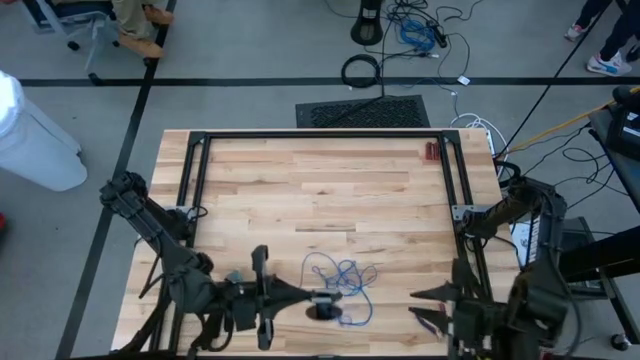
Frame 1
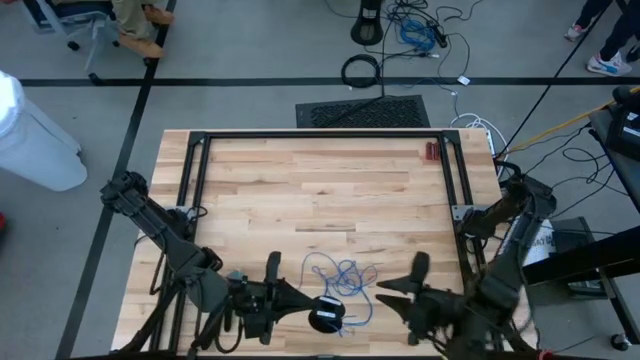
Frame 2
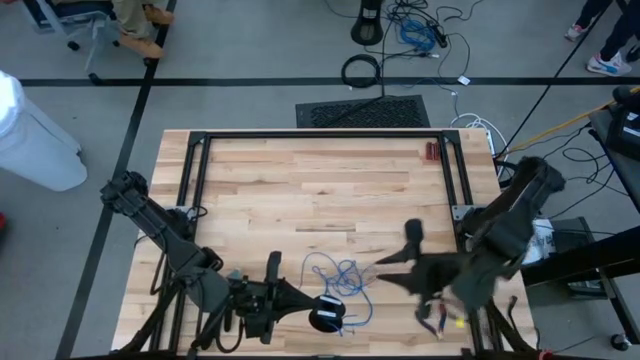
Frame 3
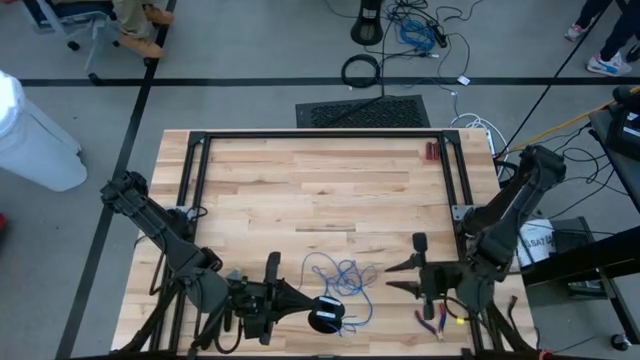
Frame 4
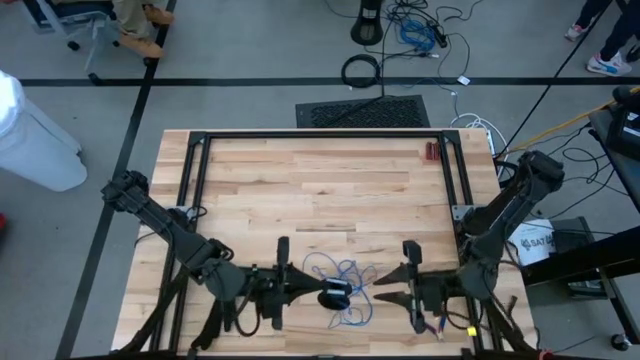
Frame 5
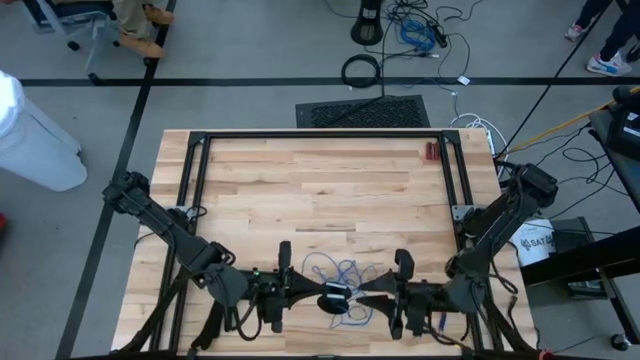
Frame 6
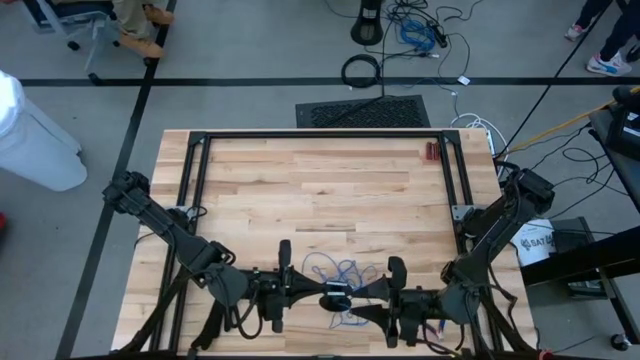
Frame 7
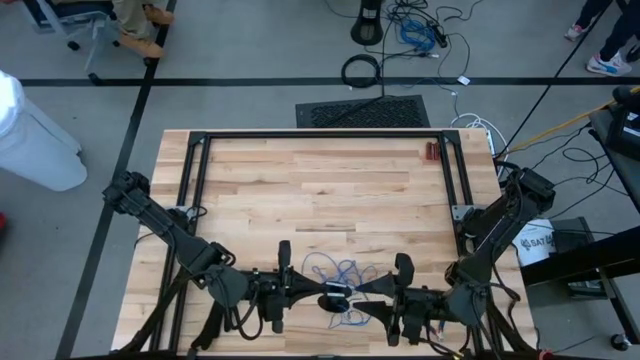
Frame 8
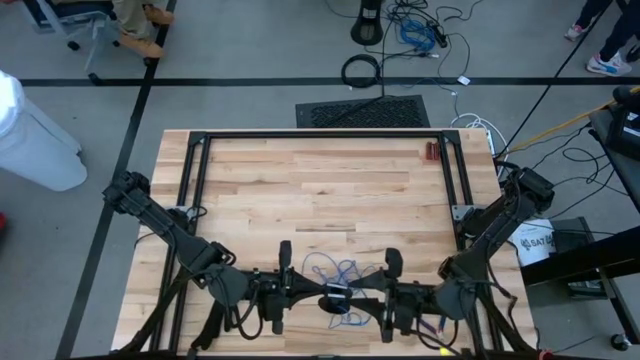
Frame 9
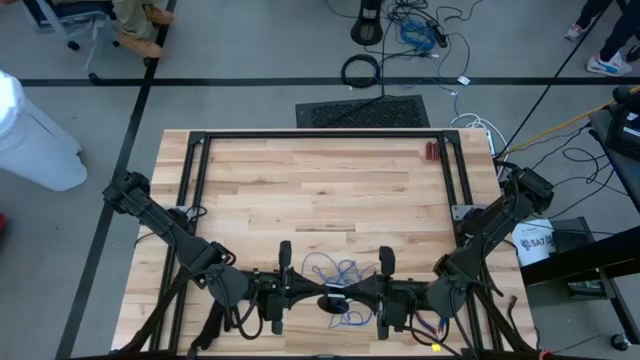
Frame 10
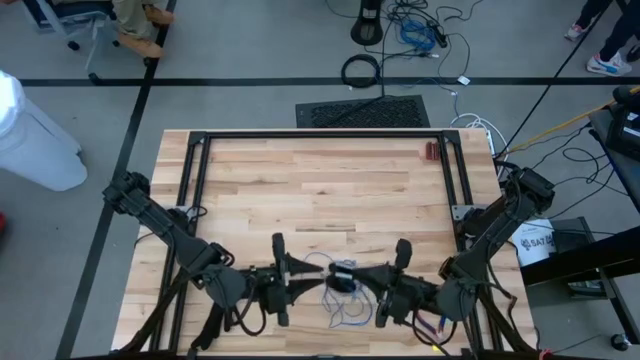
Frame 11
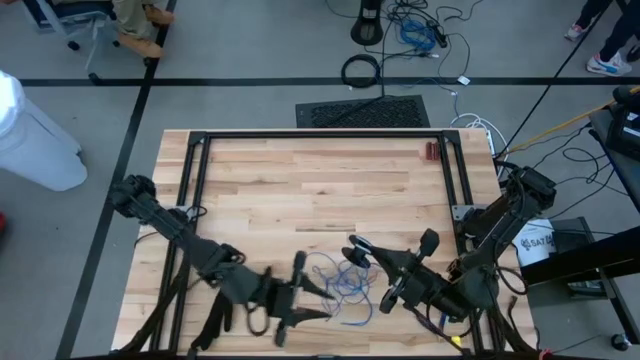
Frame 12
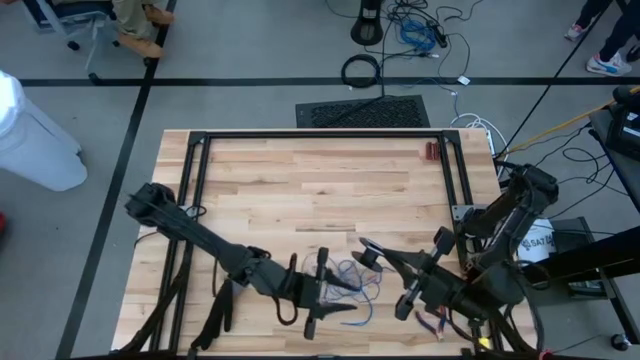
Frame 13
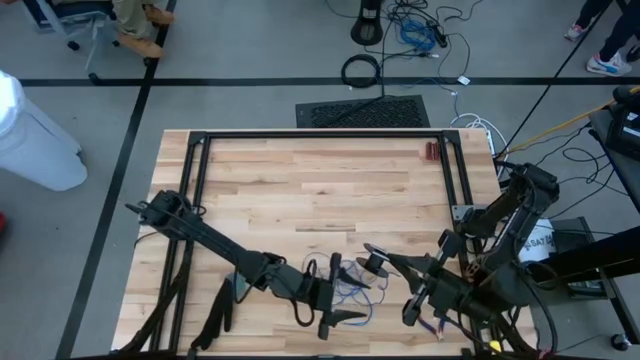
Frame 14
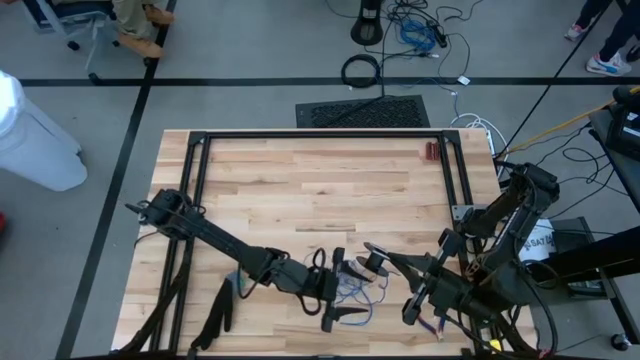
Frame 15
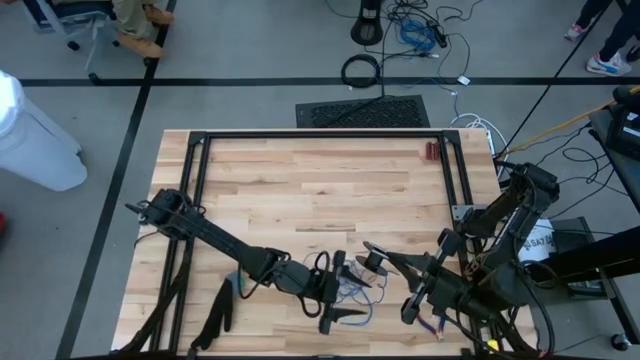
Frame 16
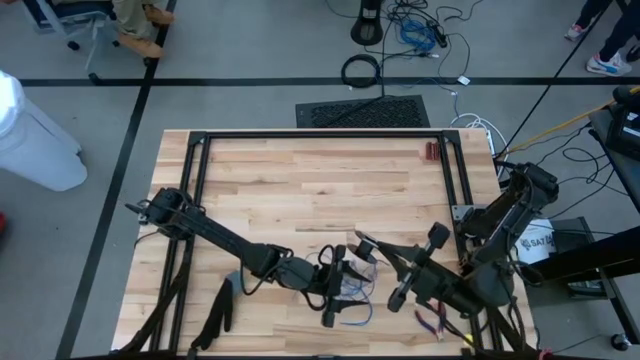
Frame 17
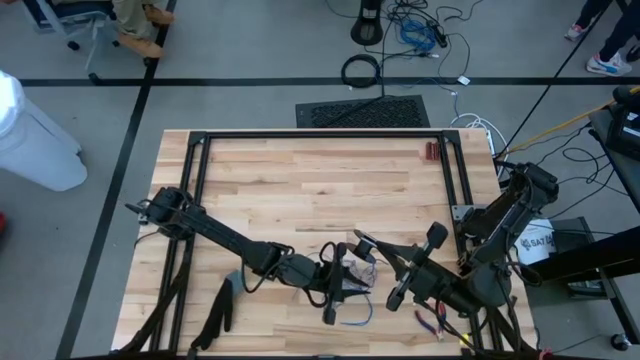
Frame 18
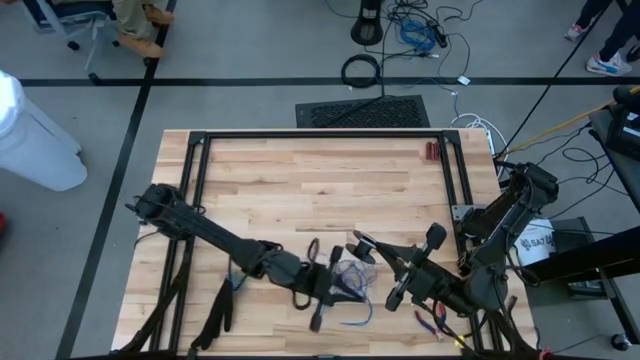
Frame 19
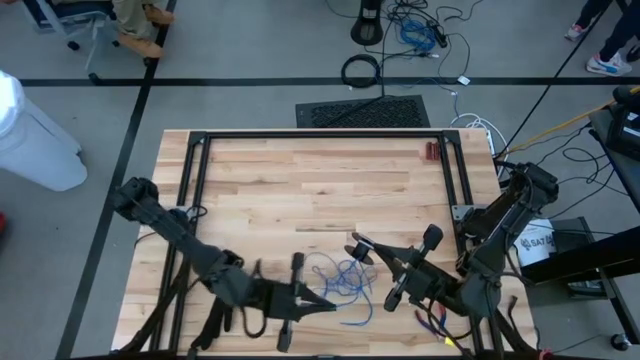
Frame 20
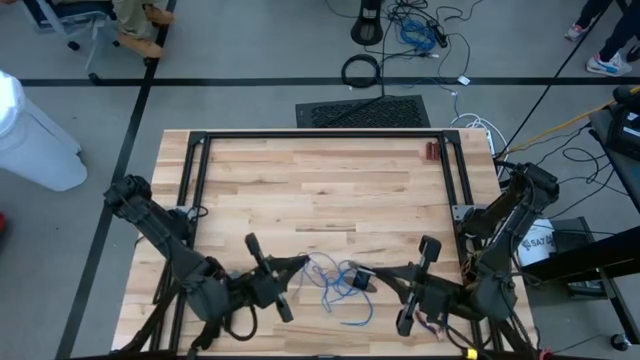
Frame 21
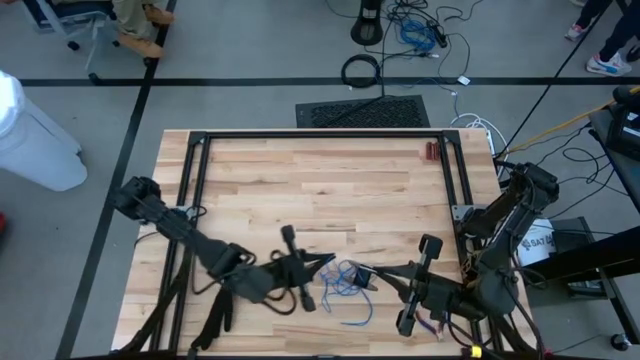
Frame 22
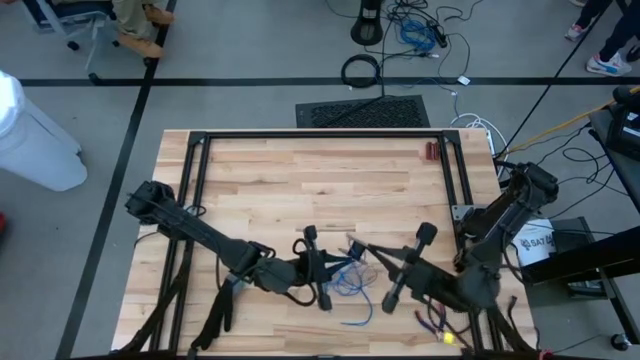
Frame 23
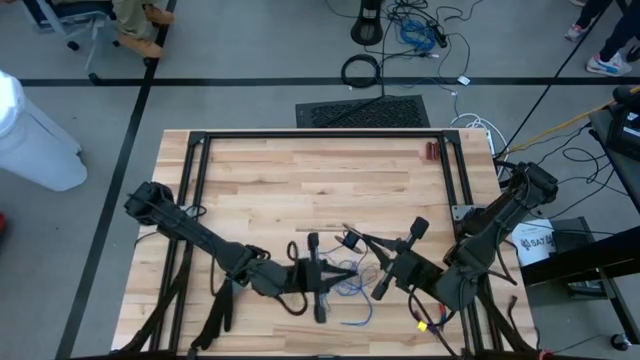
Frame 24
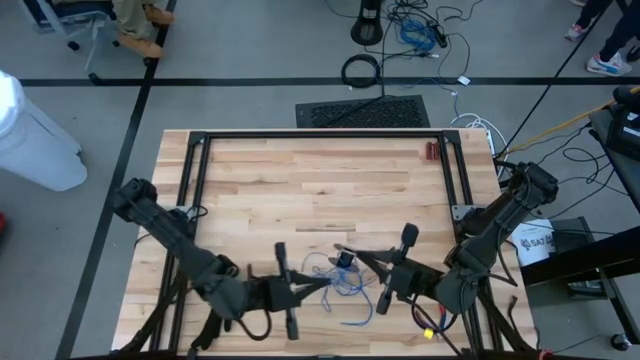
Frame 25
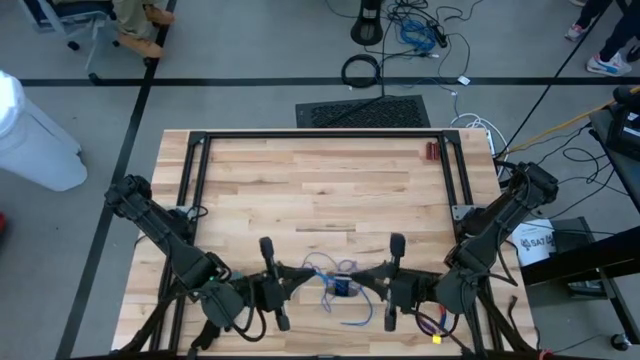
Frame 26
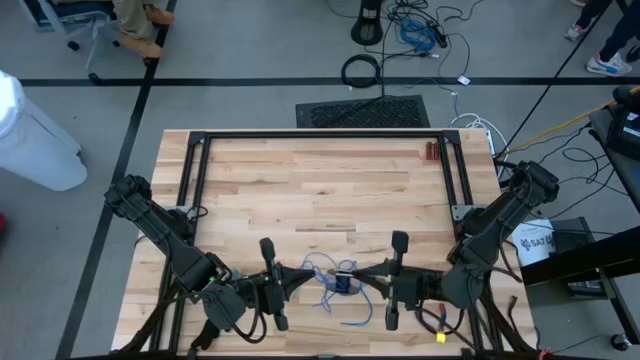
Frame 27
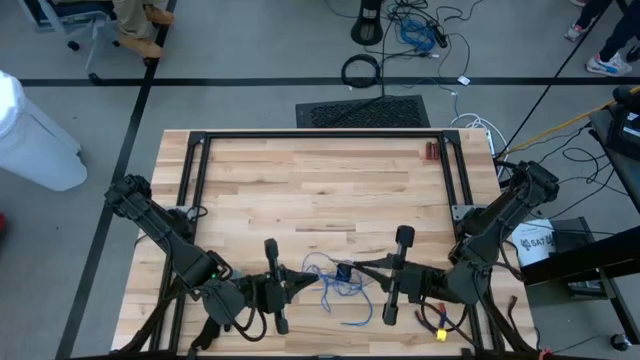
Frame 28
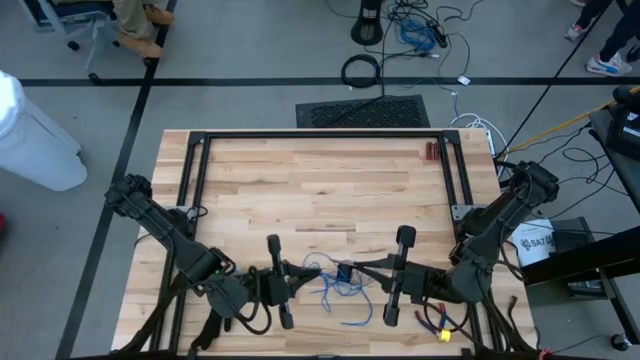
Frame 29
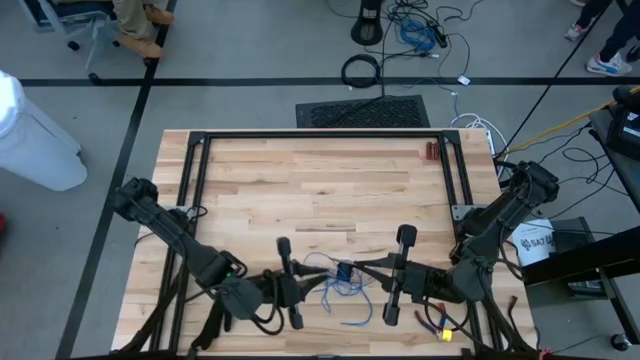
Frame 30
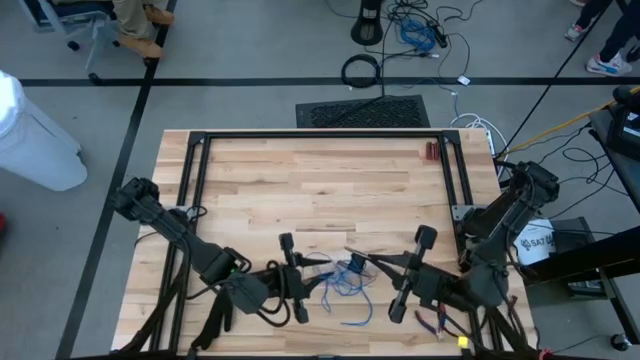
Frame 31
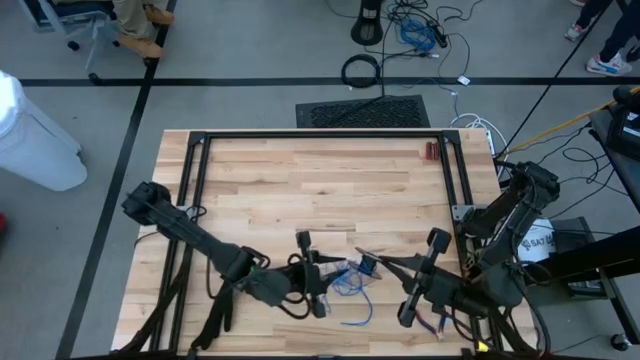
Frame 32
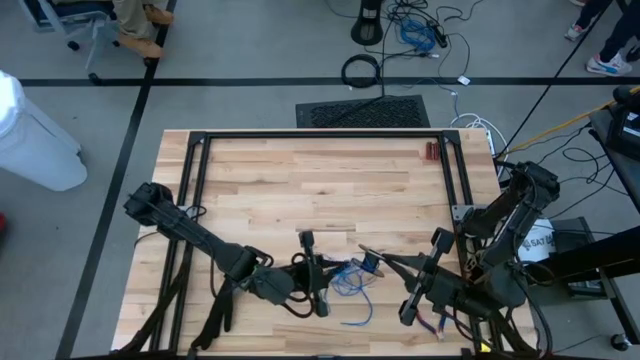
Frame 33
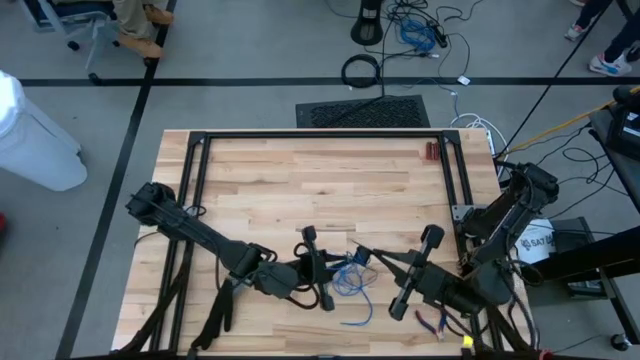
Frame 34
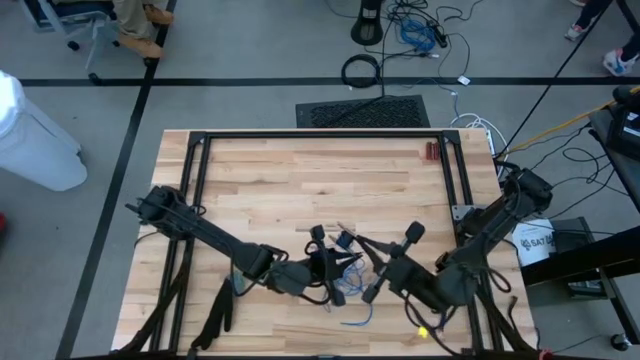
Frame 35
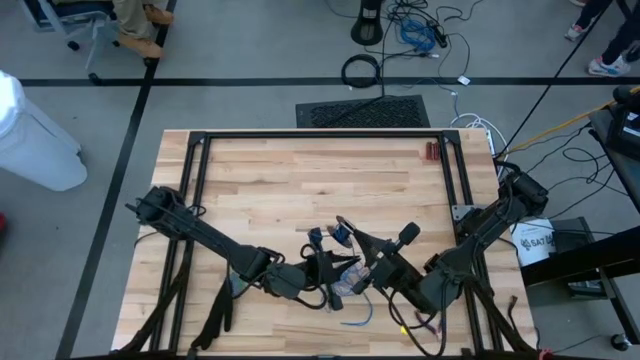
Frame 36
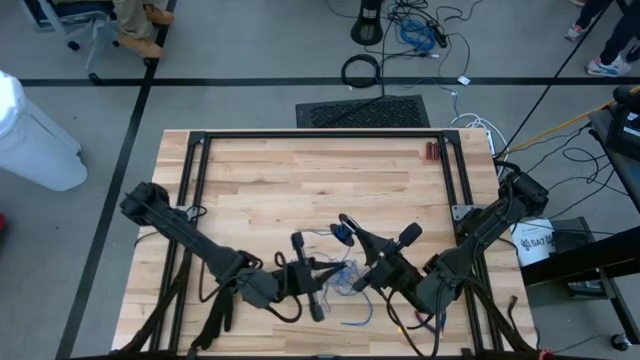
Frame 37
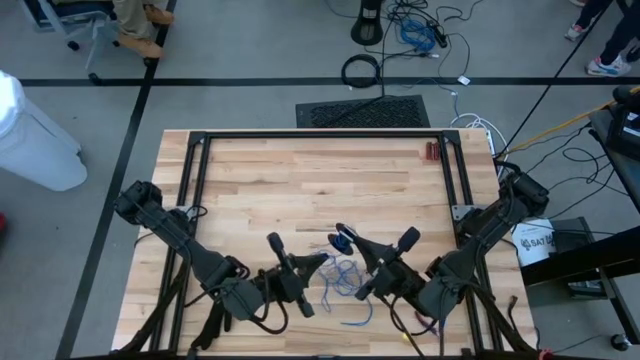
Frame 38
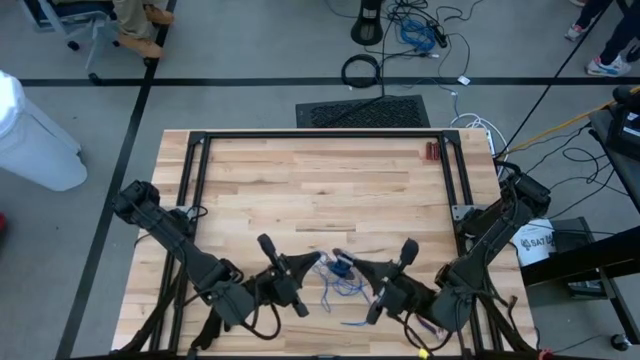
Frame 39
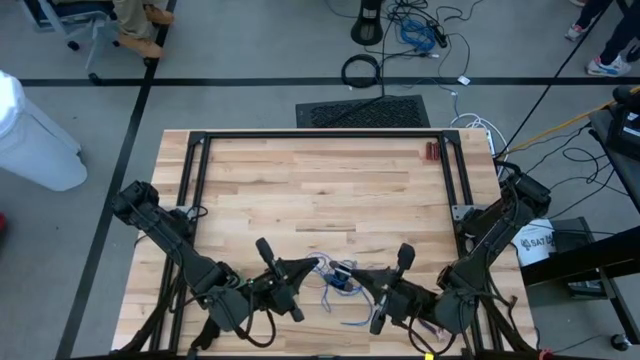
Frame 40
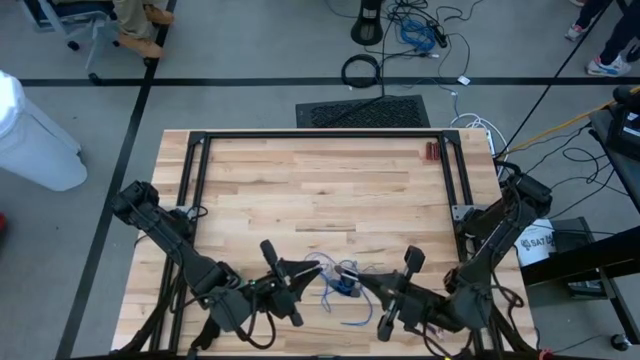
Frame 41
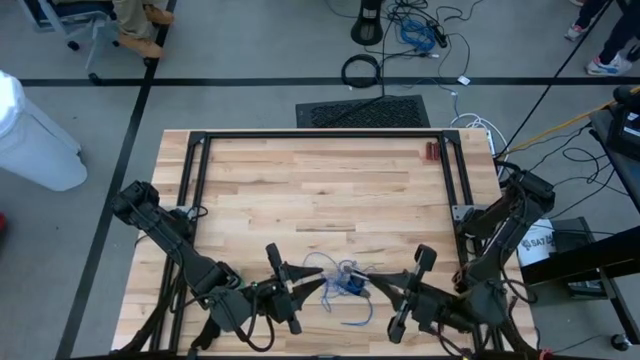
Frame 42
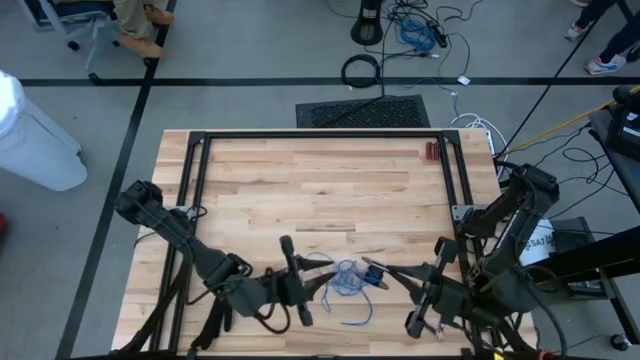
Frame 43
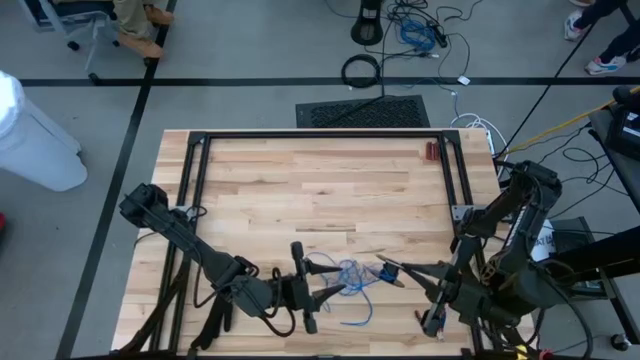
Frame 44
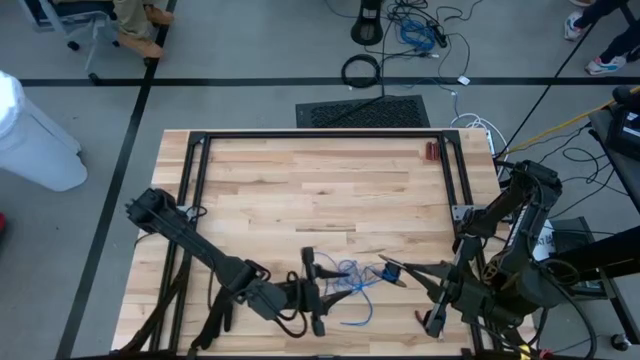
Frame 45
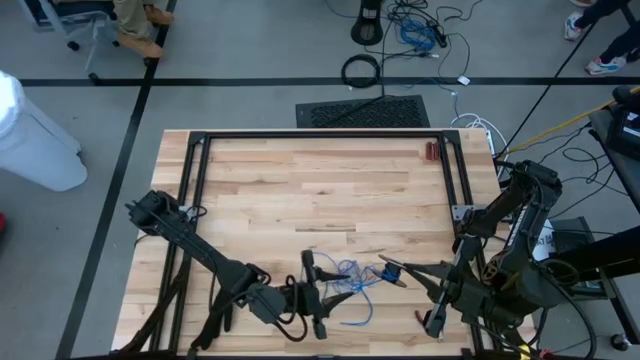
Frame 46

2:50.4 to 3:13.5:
Task: Coil cords
Coil the blue wire onto the black spool
